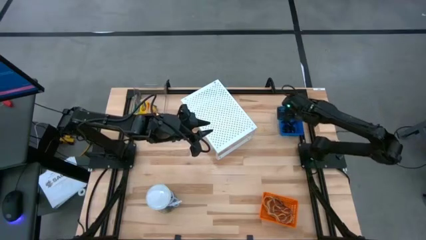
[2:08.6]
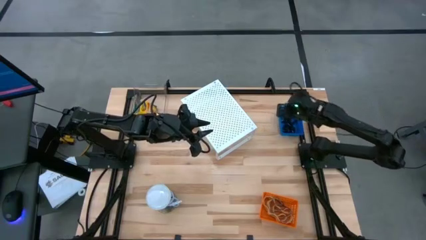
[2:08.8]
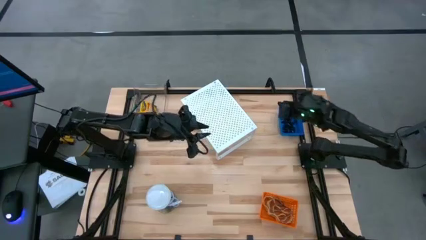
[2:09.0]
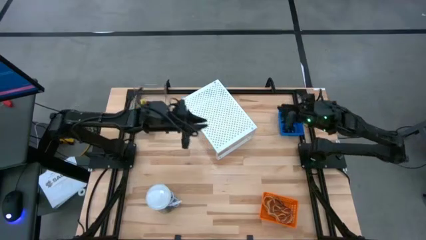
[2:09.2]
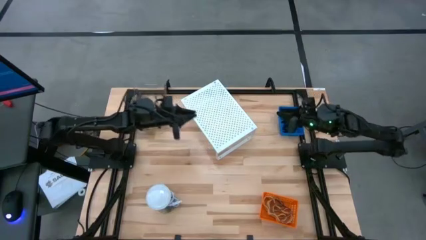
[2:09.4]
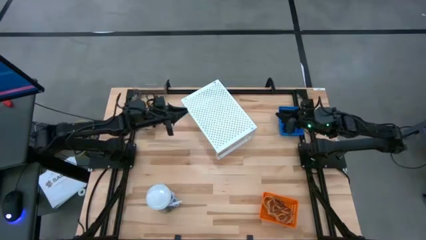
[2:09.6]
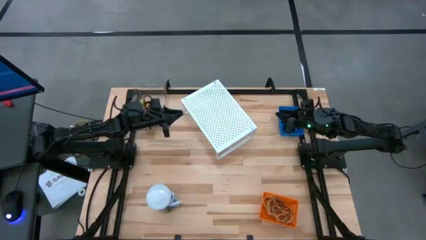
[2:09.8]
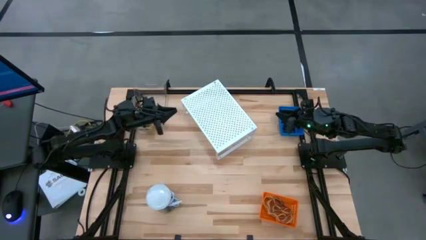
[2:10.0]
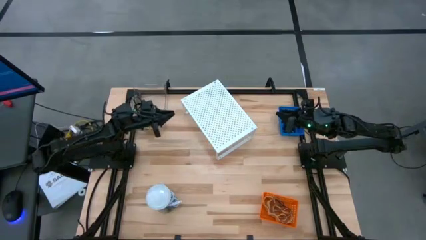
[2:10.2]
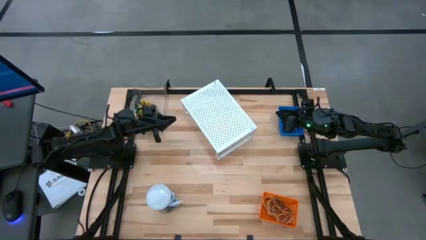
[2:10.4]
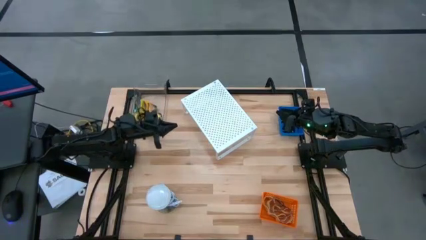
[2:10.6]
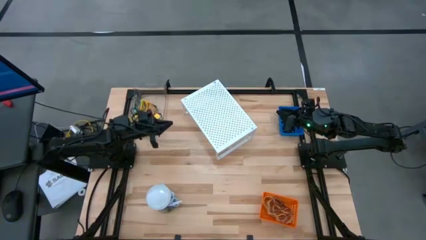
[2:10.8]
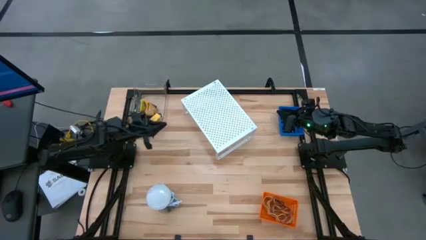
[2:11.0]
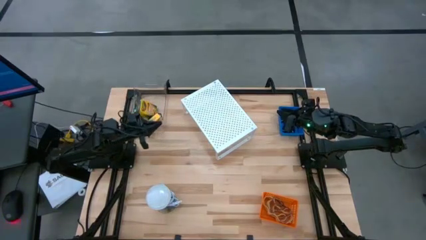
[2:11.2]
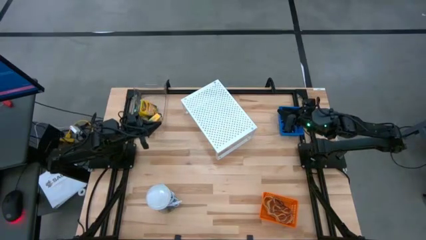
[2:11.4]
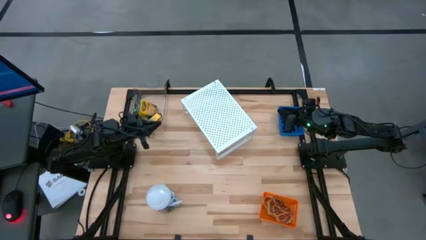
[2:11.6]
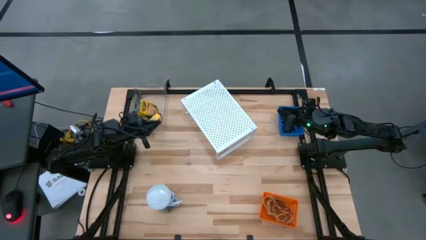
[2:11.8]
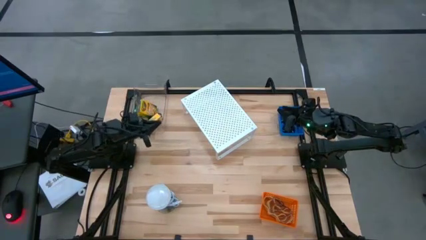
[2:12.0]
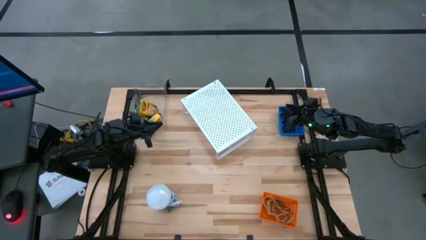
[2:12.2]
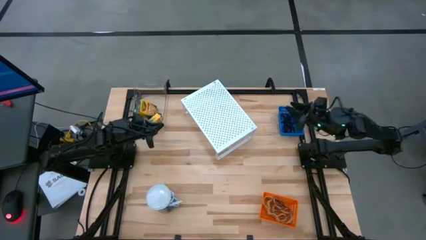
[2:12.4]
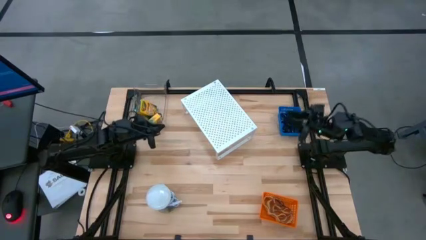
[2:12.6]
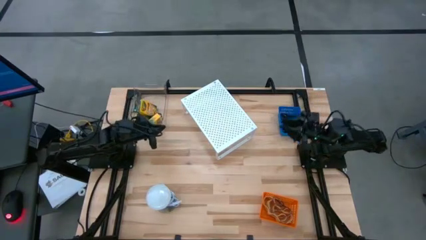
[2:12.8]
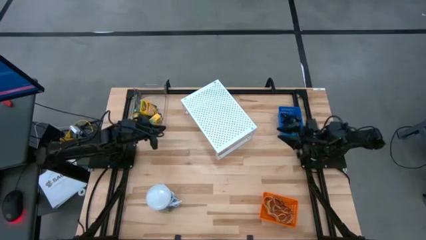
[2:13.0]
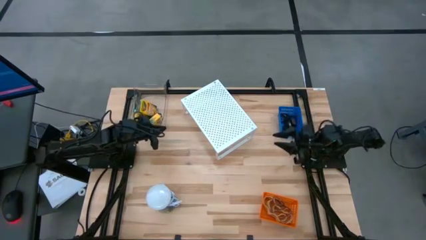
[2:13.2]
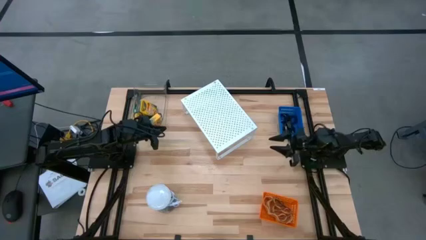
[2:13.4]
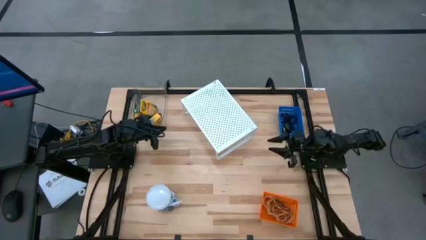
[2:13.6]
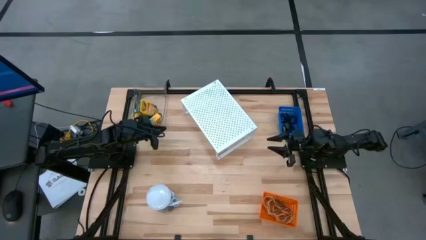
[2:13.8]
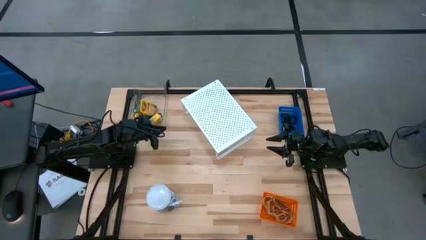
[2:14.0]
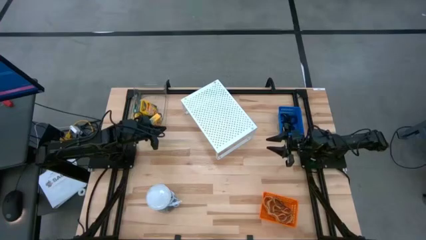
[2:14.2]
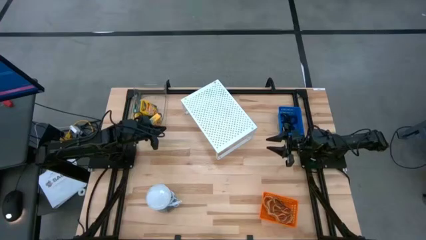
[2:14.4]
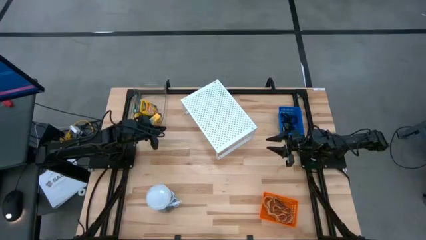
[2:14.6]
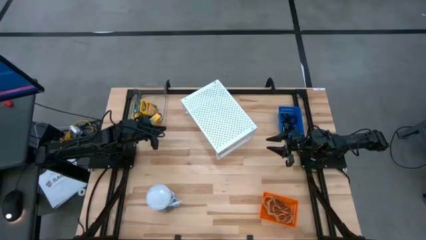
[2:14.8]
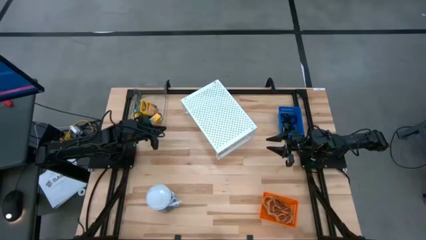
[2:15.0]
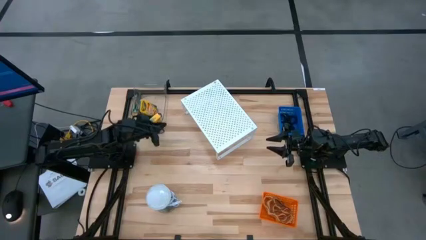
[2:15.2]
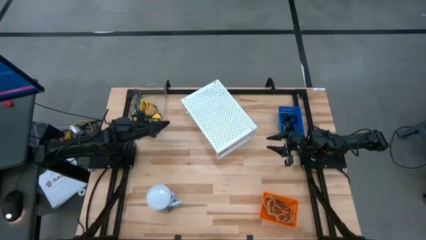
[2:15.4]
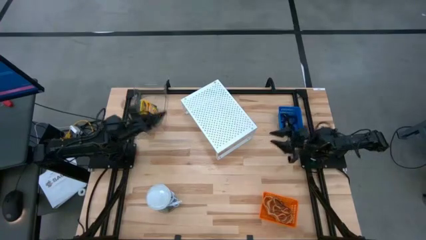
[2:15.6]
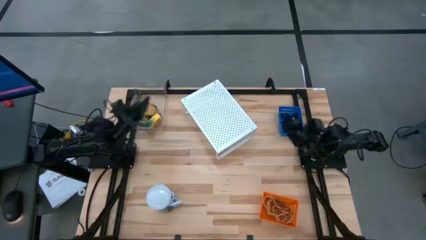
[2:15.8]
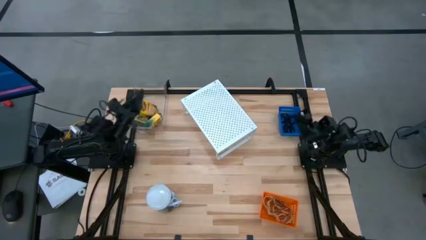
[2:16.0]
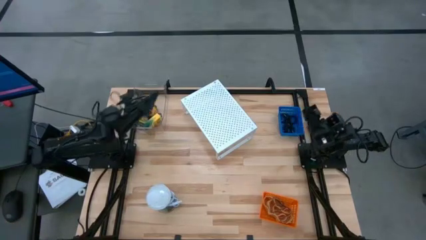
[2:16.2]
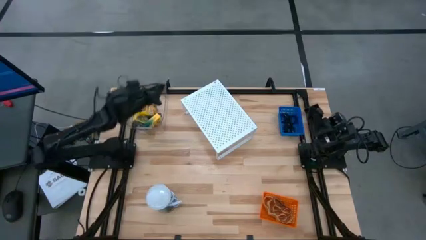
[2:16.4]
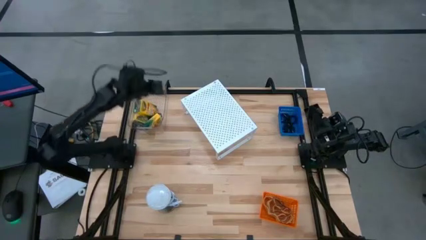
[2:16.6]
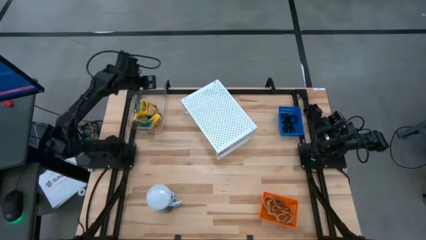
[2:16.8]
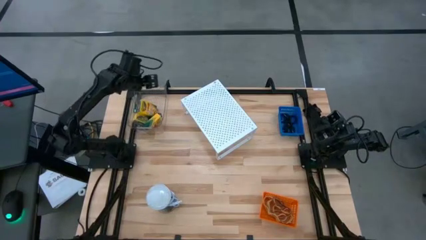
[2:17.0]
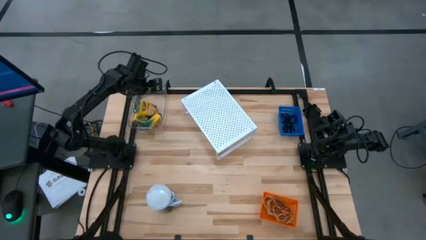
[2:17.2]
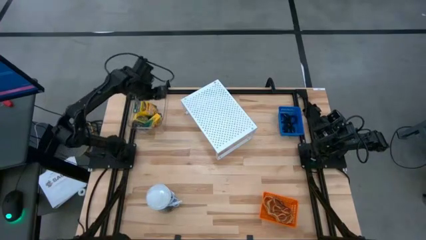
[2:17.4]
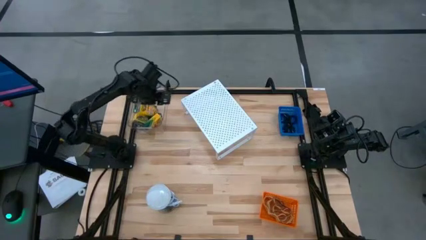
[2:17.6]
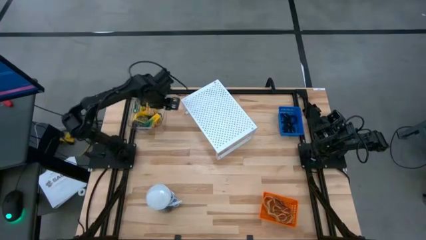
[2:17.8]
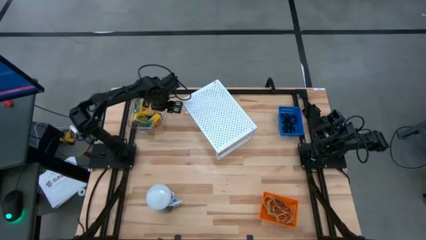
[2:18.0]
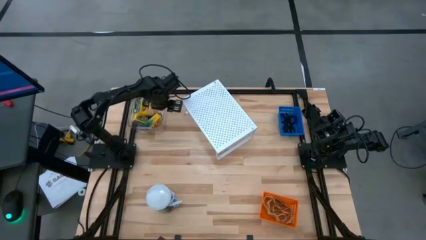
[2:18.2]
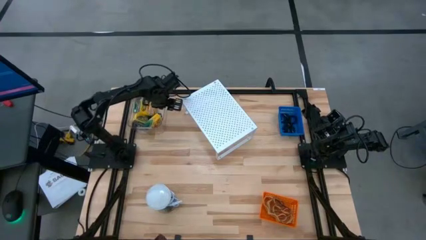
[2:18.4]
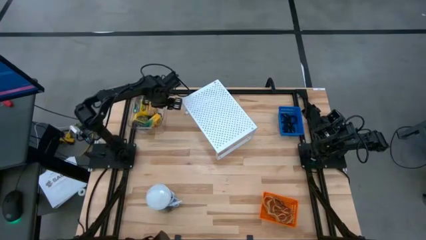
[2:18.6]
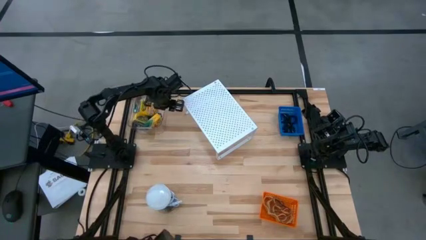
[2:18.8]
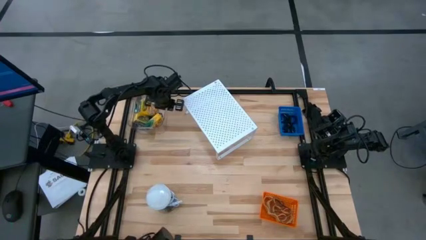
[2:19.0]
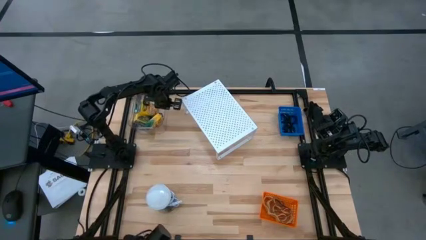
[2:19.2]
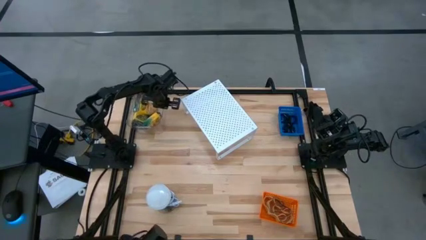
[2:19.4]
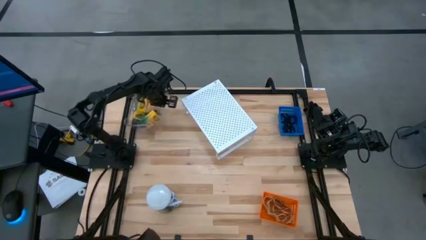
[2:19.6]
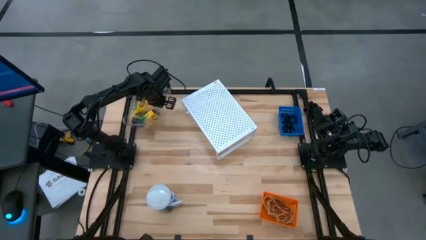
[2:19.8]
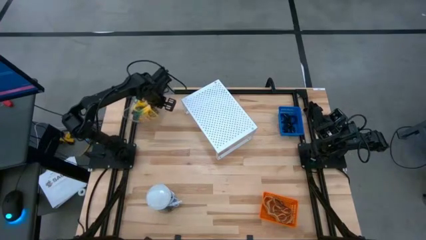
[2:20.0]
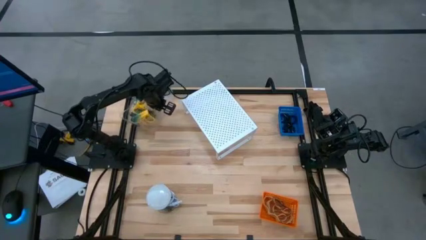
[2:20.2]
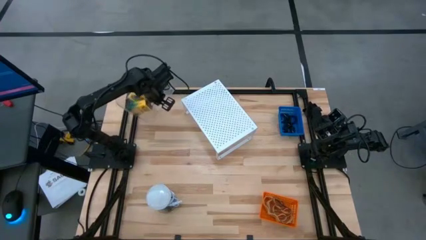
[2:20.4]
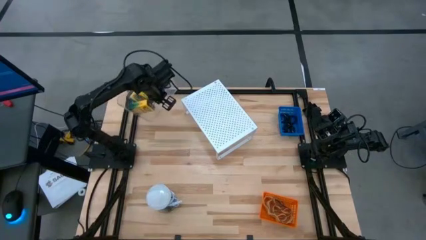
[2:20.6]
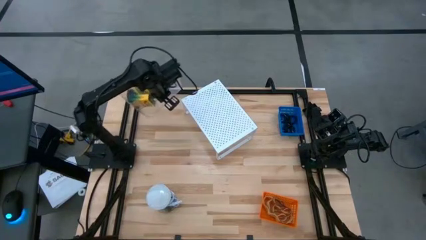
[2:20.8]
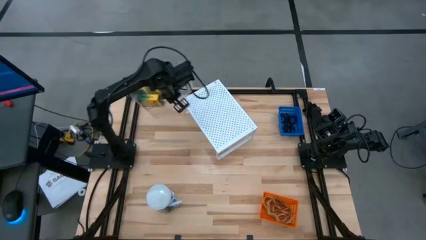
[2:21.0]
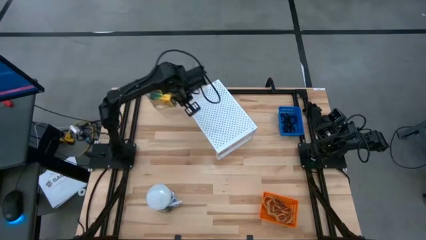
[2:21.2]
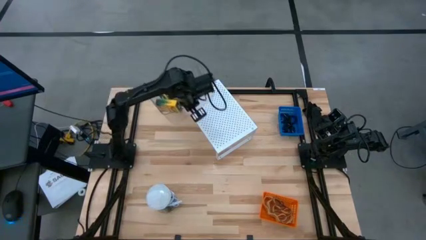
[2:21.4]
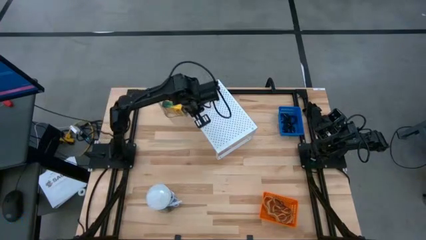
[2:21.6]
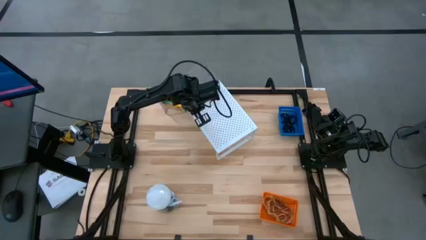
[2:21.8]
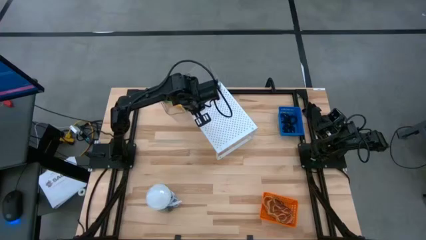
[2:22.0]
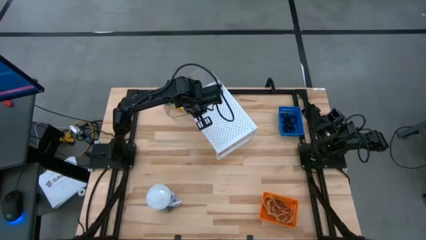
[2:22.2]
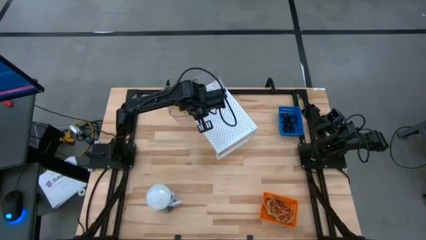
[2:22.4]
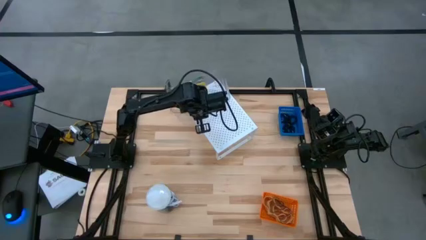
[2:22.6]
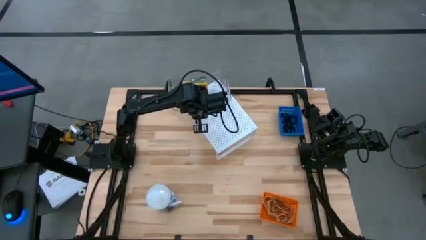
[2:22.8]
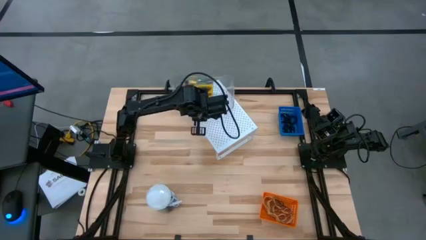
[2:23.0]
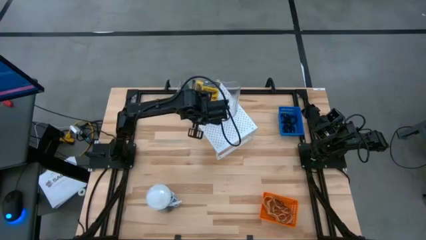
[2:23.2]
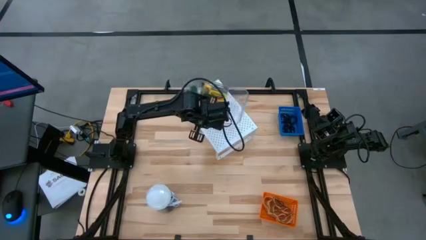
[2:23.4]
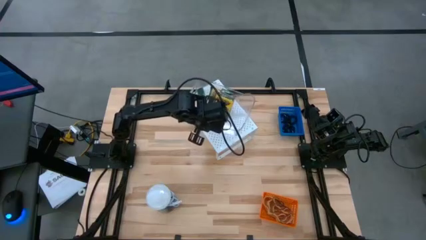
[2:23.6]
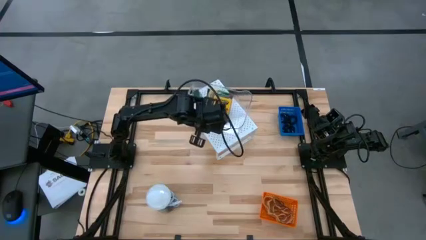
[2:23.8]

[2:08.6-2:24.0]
Task: Pick & Place Office Desk Supplies
Put the transparent bin on the shelf
